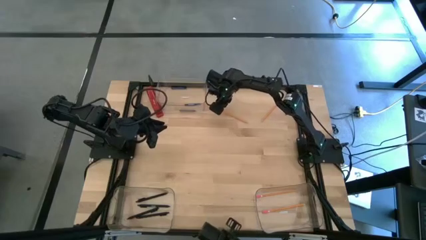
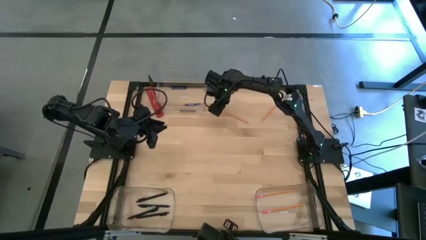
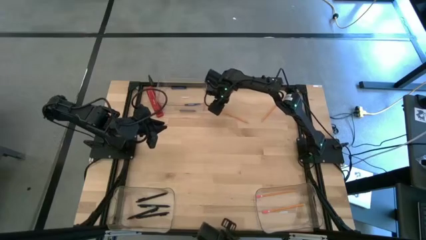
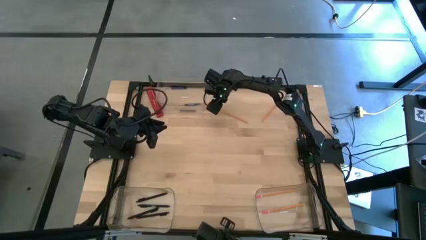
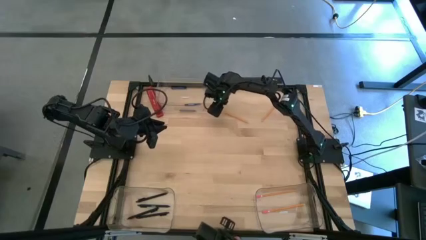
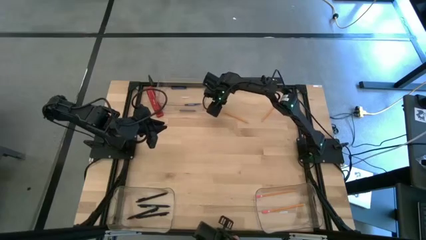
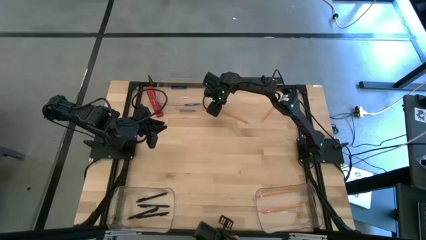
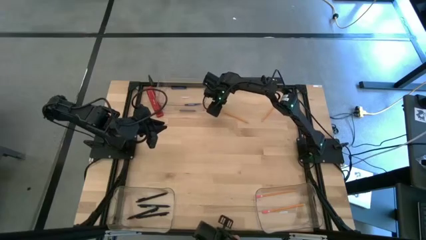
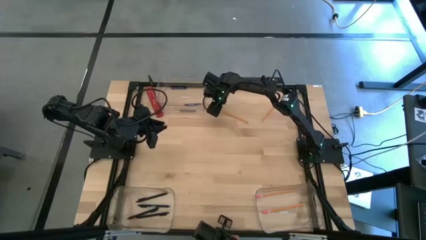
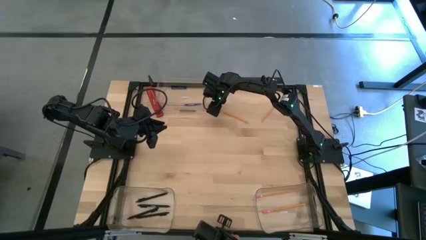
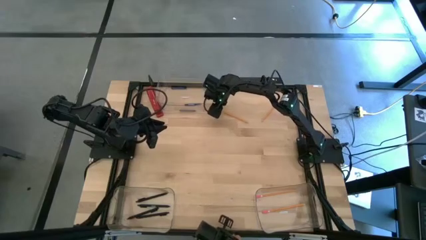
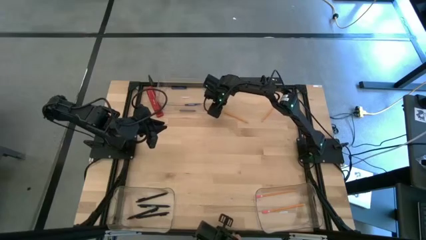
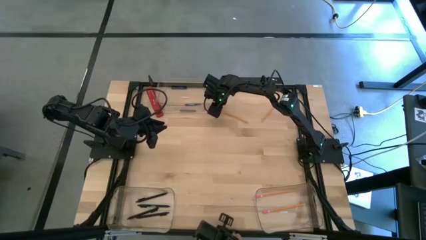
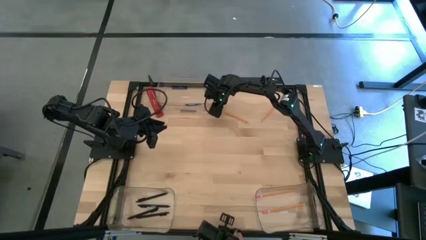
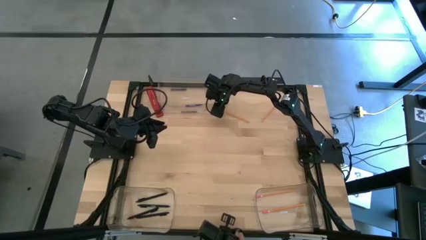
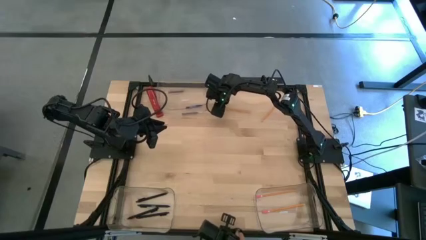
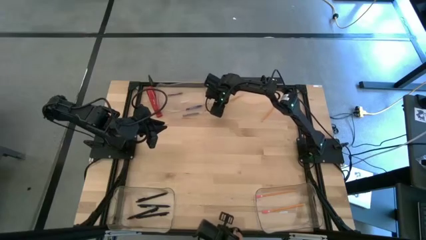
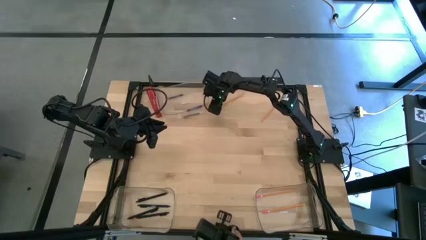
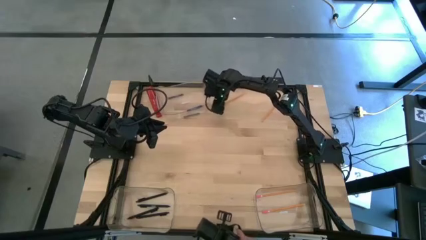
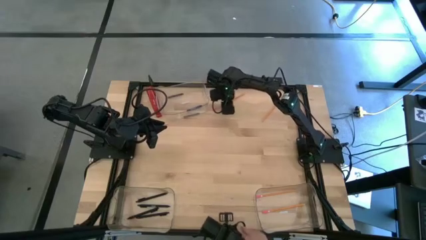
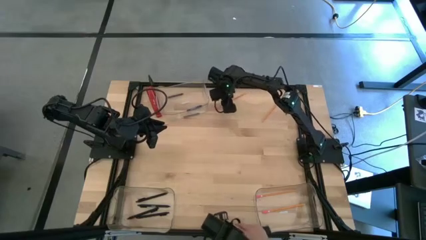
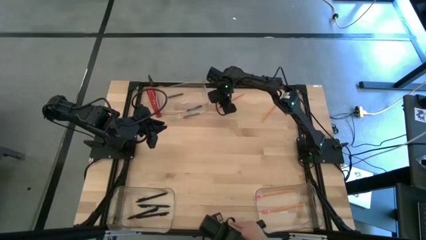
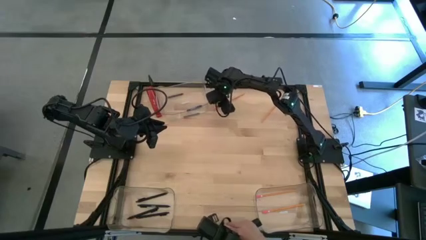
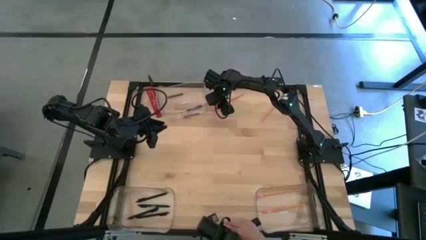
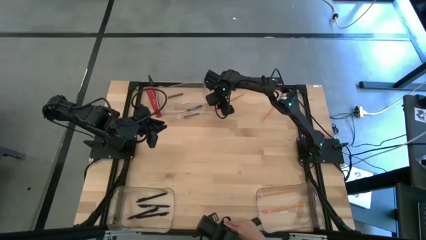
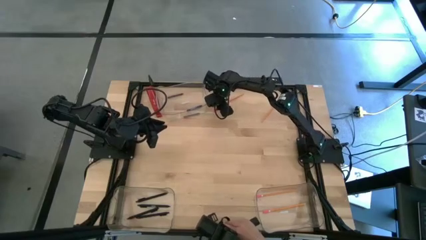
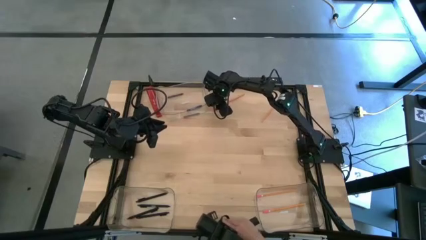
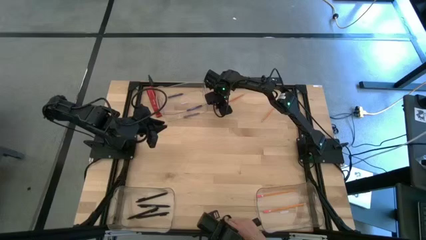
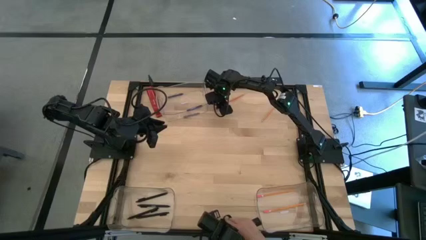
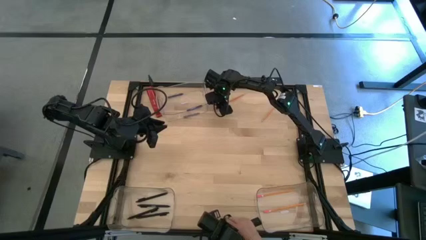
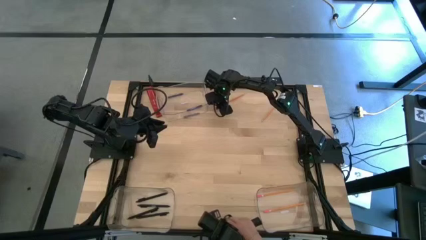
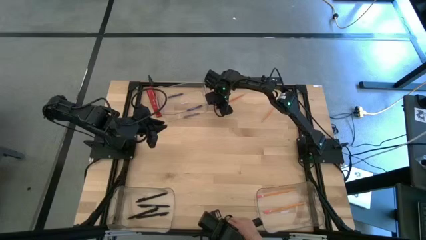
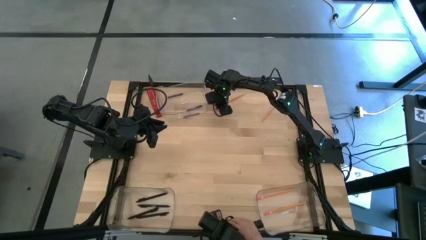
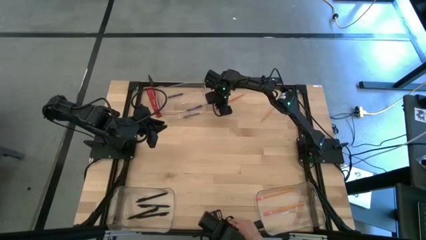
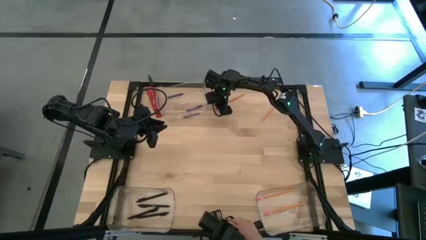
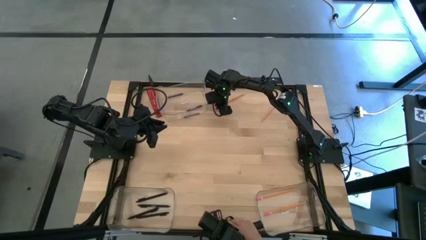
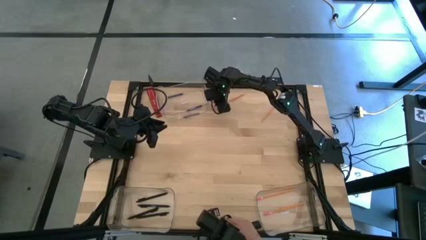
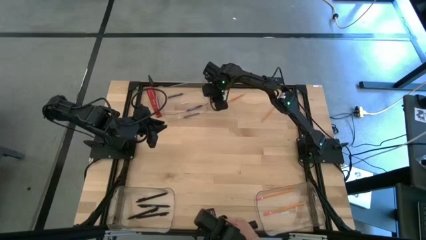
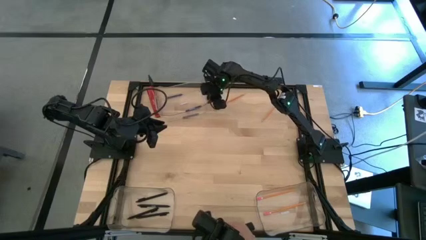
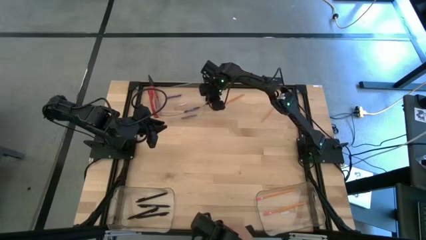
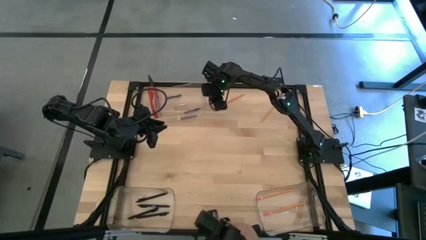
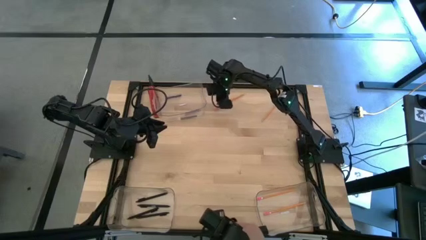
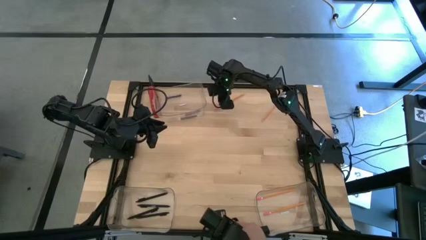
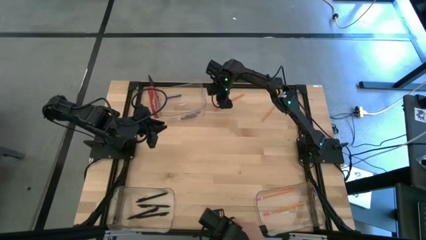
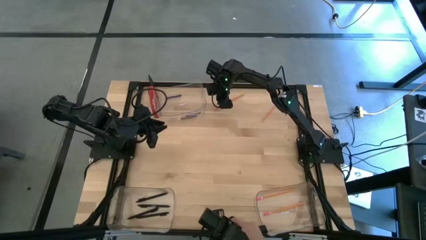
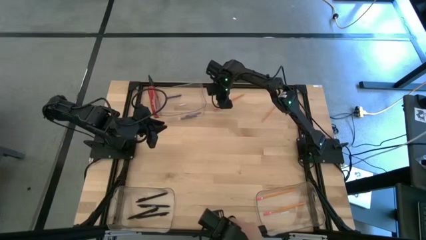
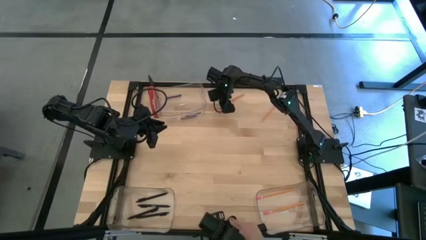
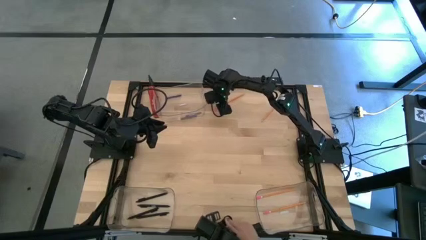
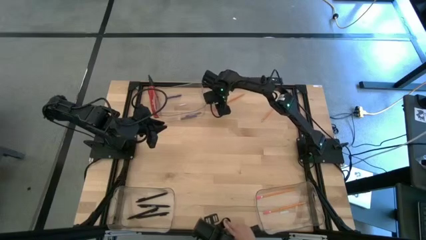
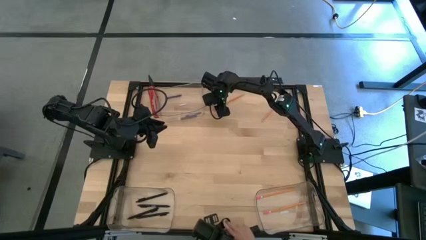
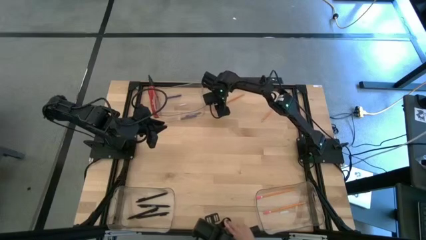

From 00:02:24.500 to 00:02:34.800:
Task: Sort crayons/erasers/pens/pencils in bins
Put the yellow pencil into the bottom right transparent bin
